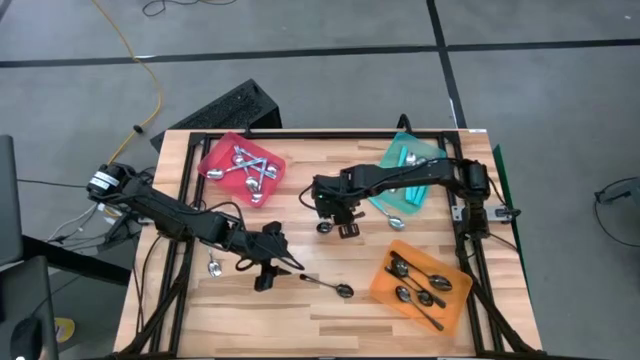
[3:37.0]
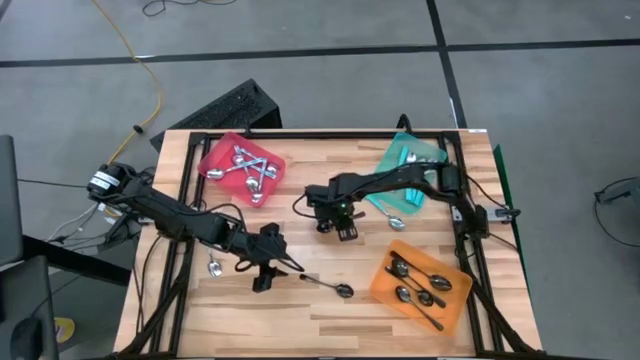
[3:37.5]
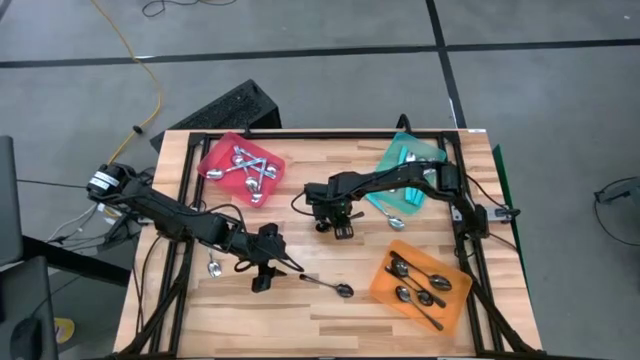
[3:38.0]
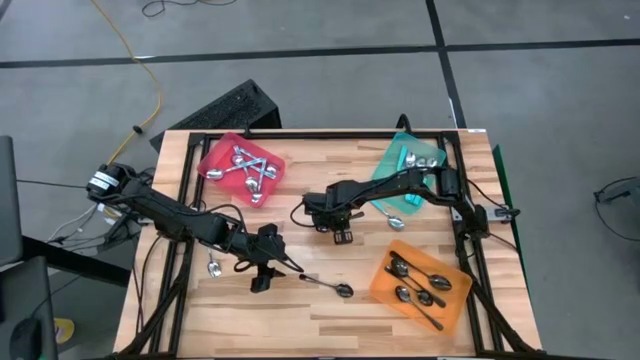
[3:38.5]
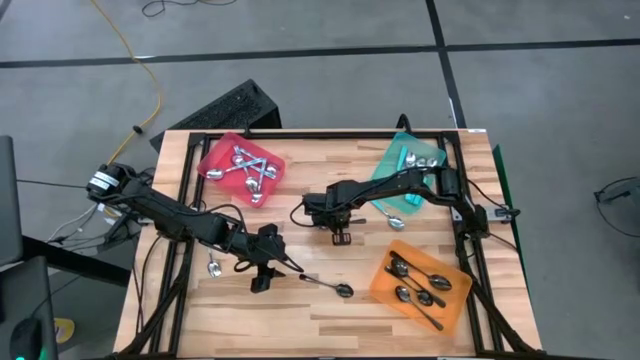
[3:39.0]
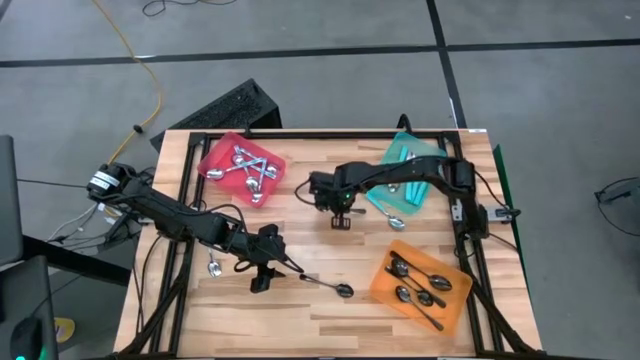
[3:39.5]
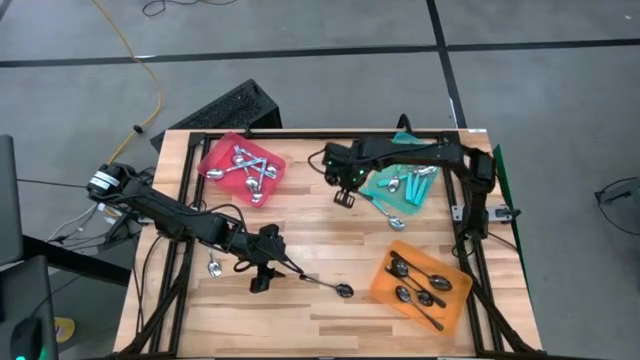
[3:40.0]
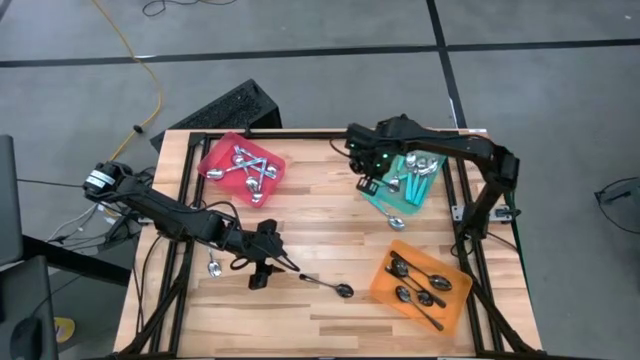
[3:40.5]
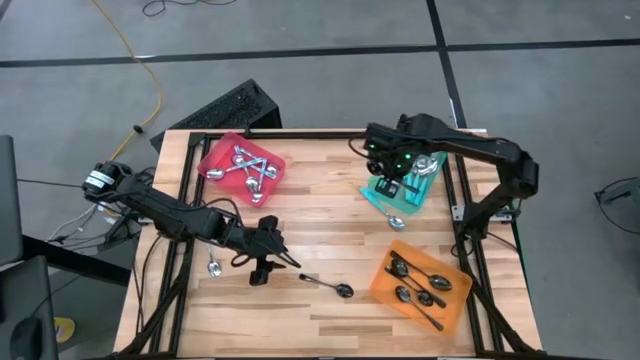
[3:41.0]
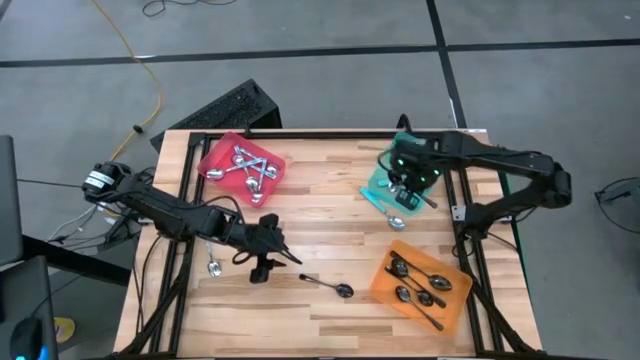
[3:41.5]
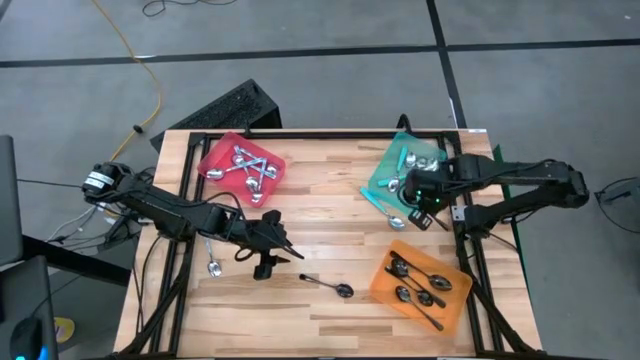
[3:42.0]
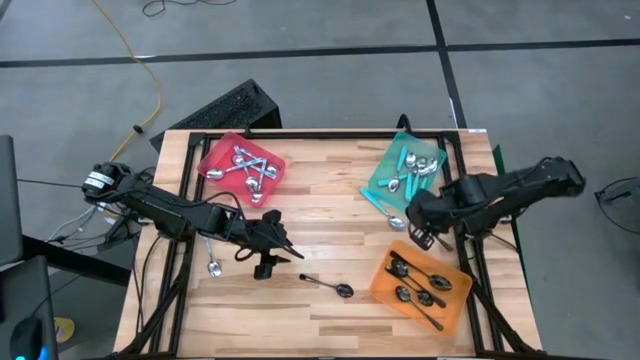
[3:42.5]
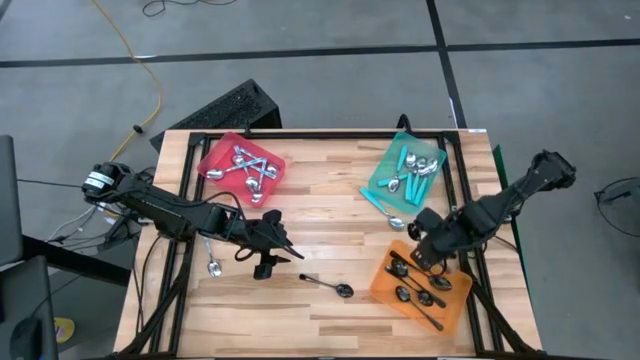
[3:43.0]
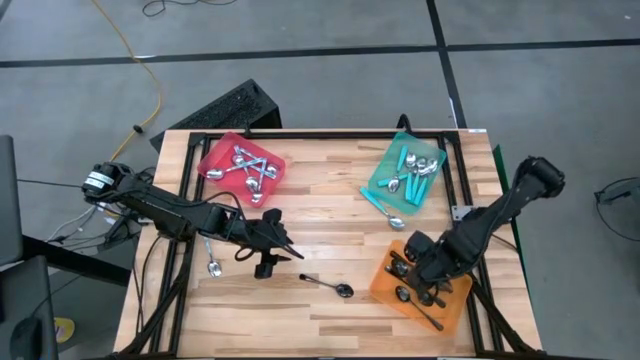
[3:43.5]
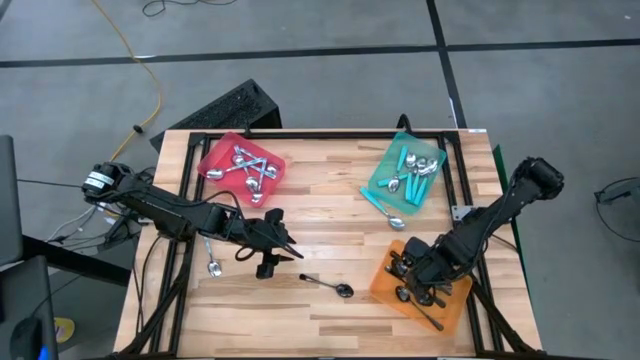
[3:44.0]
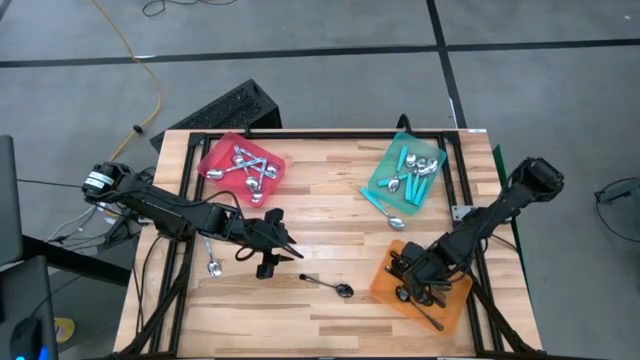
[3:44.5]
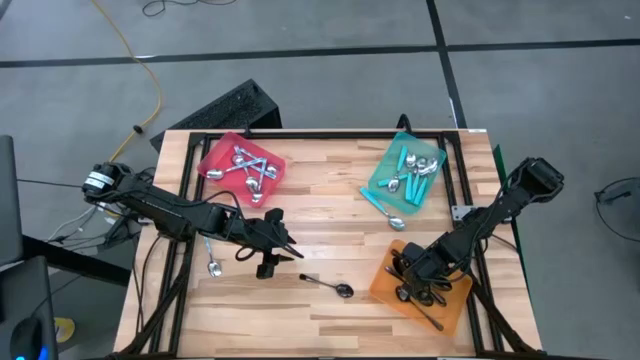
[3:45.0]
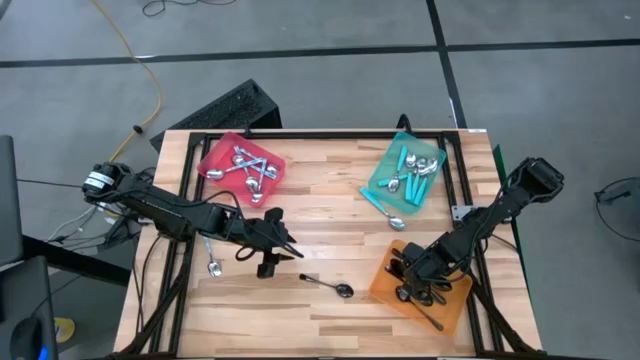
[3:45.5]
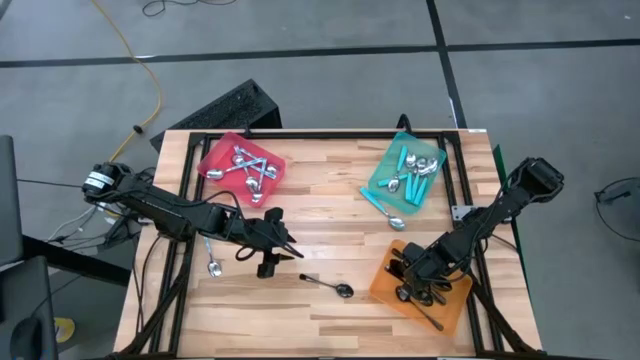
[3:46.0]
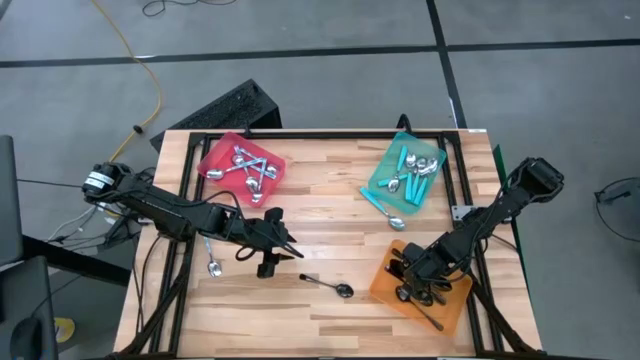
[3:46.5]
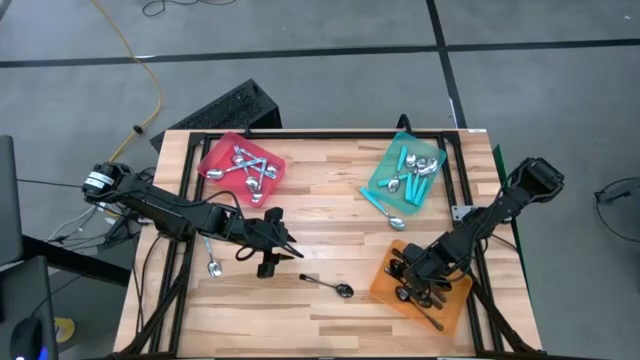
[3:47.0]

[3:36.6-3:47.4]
Task: Sort silverware by color (type)
Put the black spoon into the orange bin

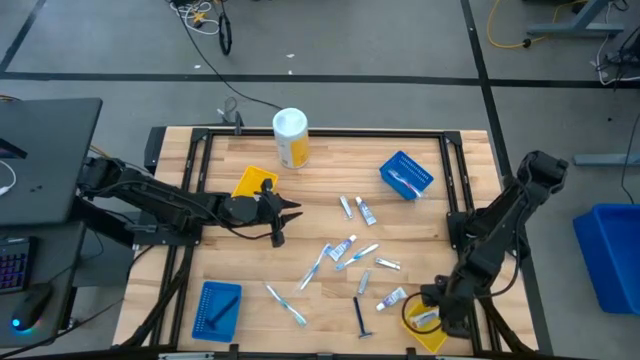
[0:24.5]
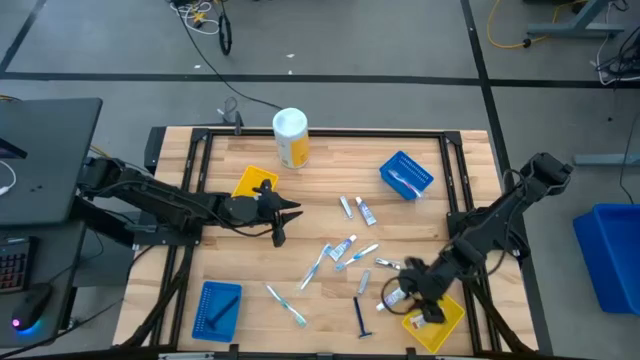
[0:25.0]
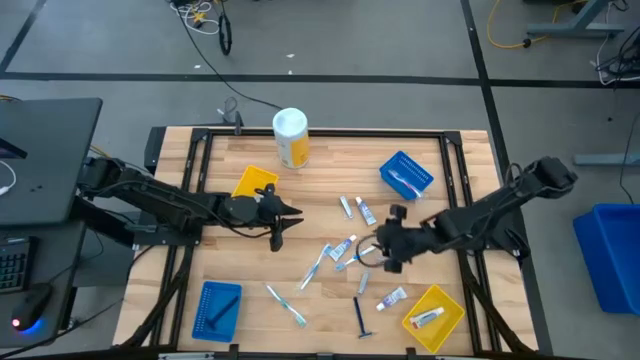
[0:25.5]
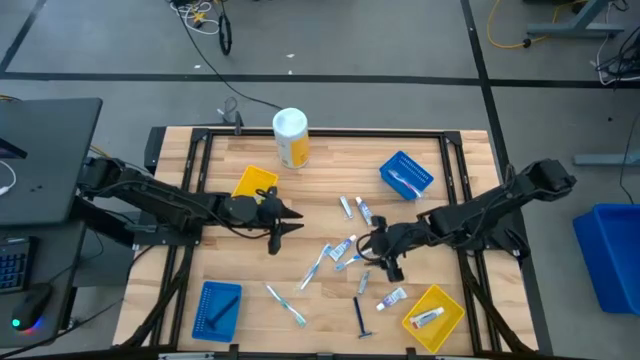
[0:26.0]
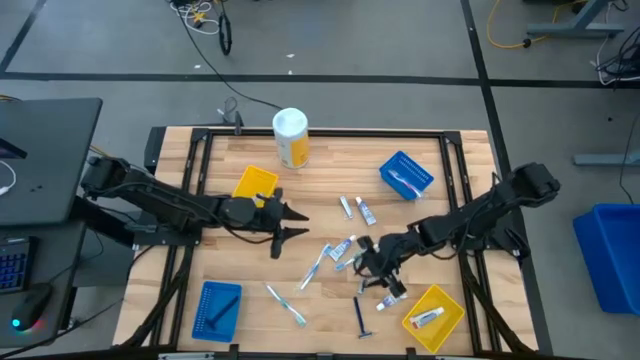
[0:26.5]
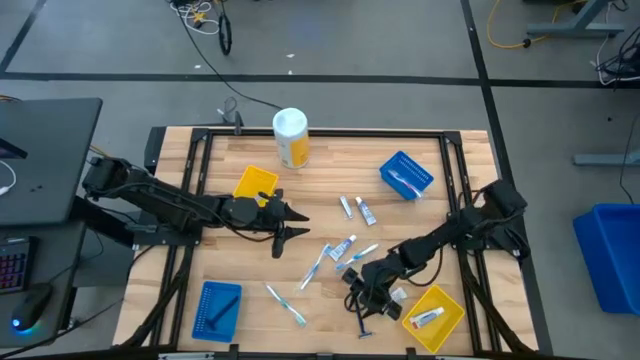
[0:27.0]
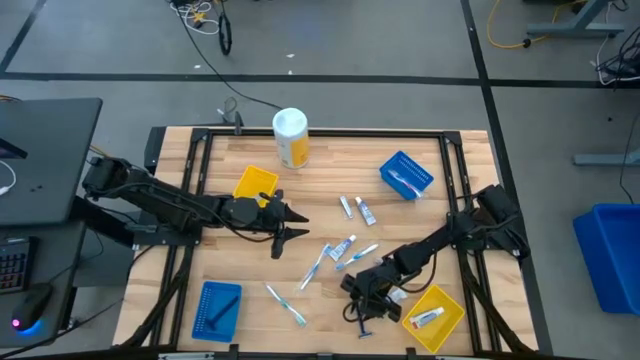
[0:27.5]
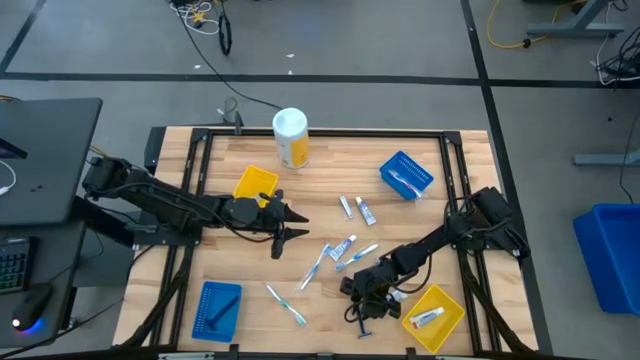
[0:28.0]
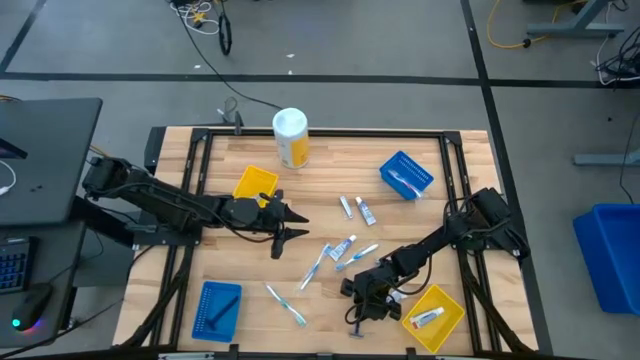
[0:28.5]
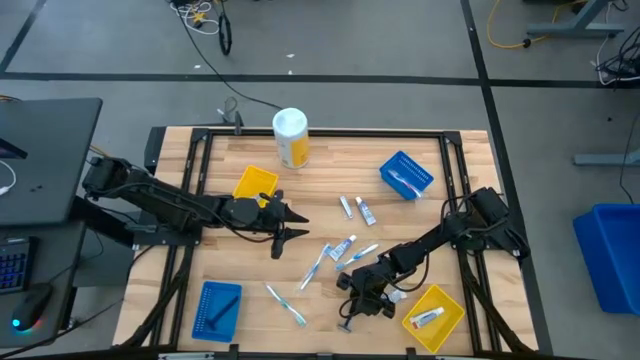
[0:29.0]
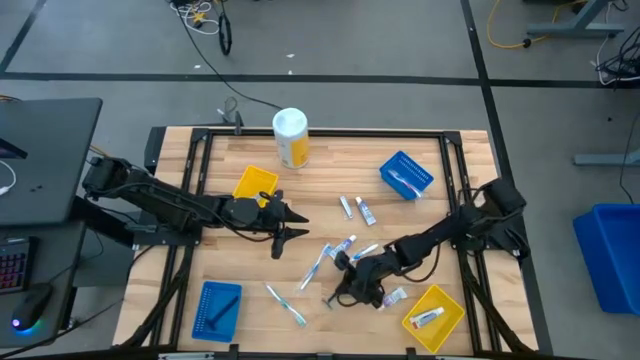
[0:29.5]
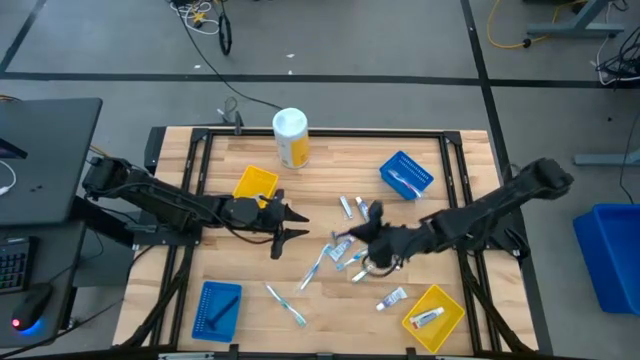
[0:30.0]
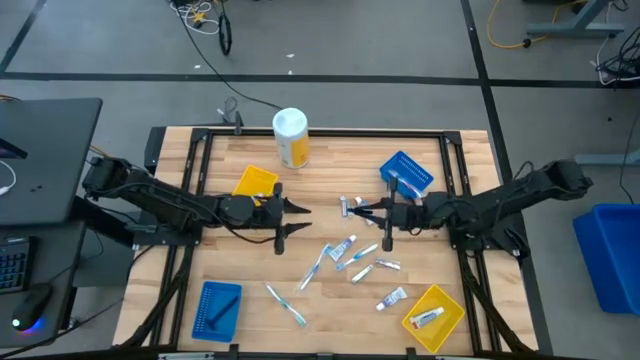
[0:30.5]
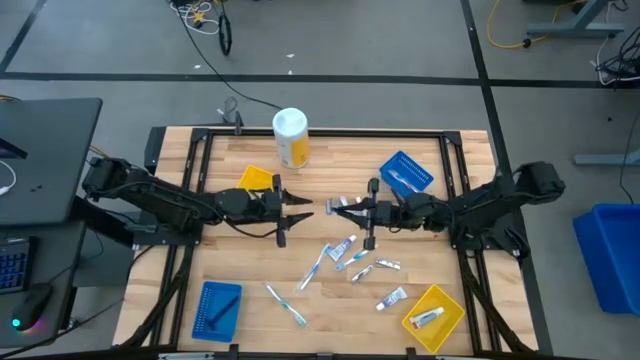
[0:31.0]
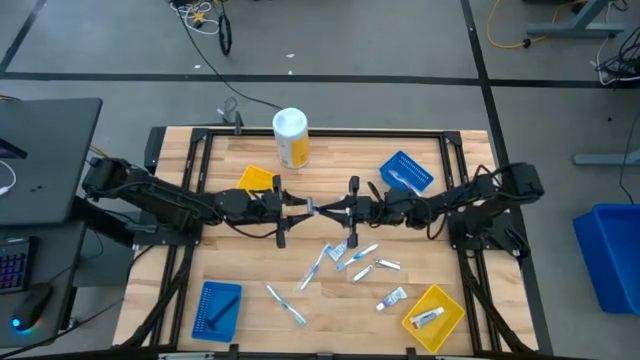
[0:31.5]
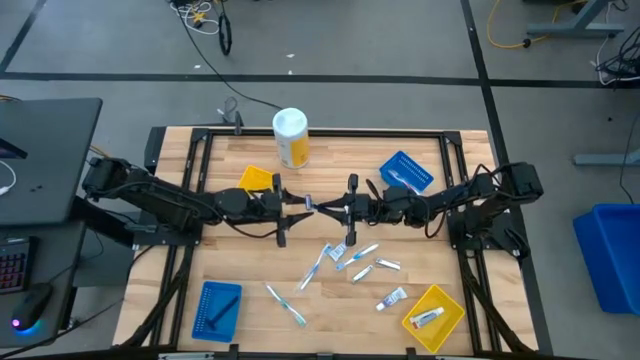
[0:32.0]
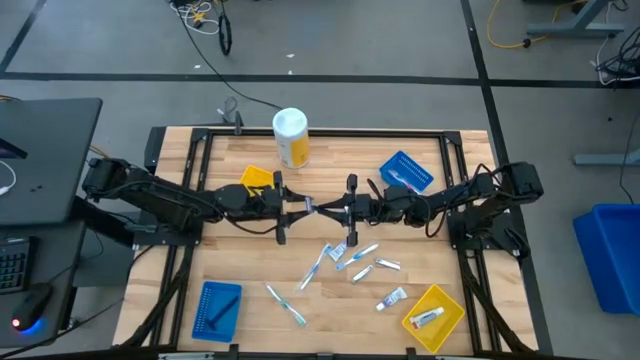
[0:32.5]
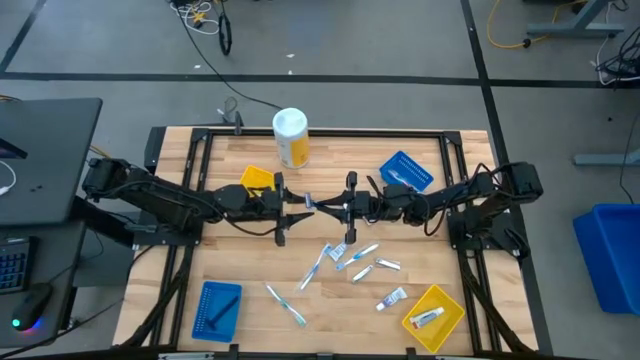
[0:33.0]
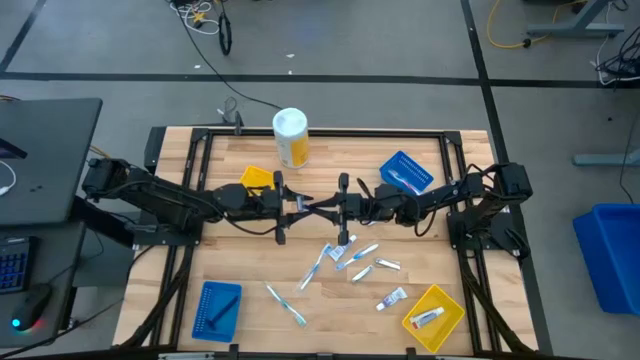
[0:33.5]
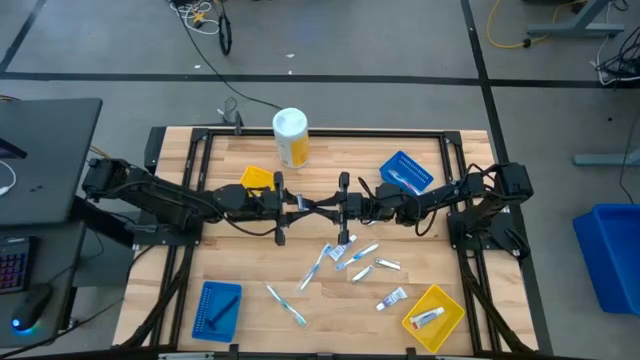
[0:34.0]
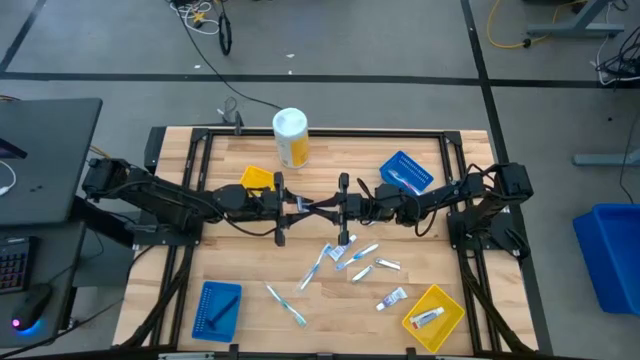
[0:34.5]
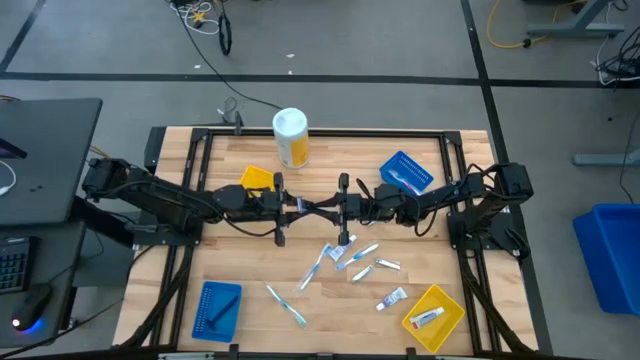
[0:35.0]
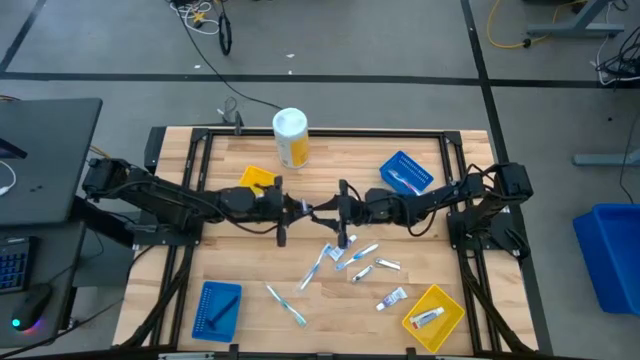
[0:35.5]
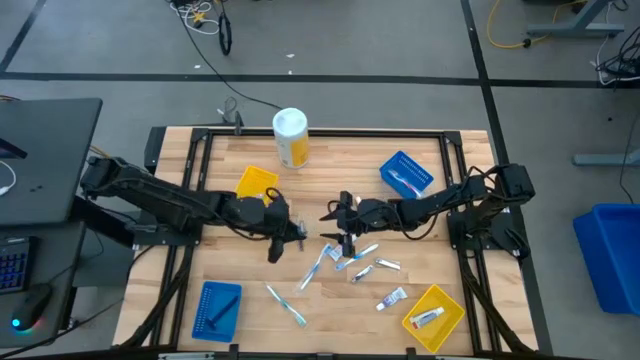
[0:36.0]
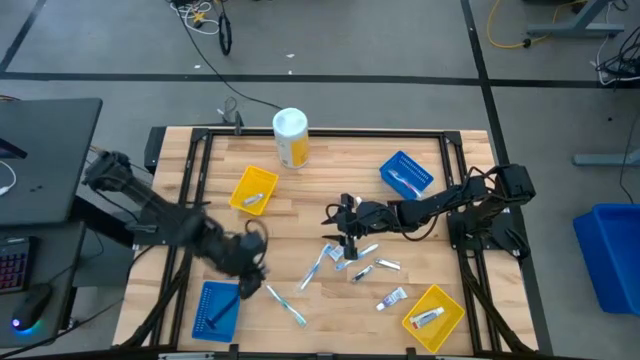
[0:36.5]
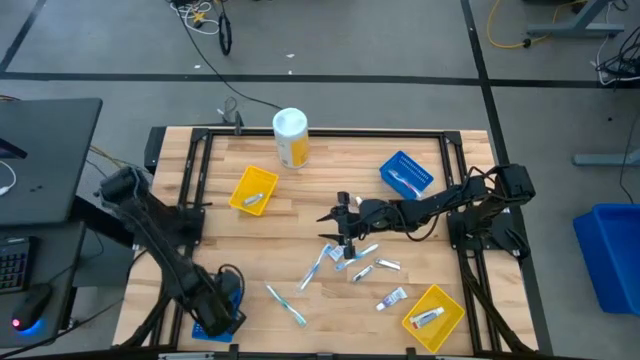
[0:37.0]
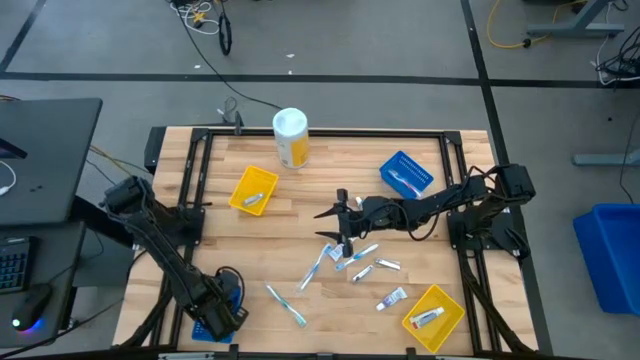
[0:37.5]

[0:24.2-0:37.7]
Task: Pick & Place Travel size toiletries
Put the blue razor into the bottom blue bin
